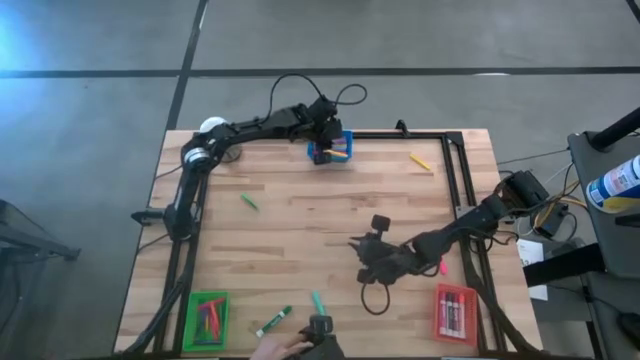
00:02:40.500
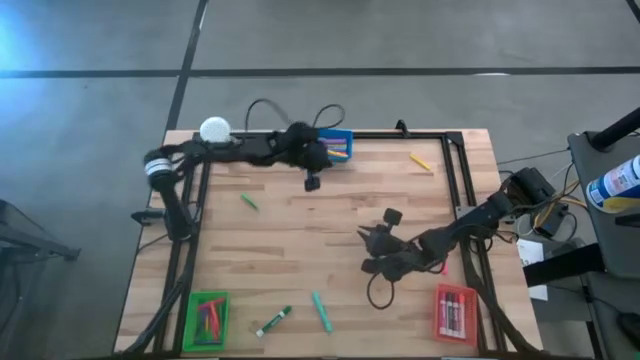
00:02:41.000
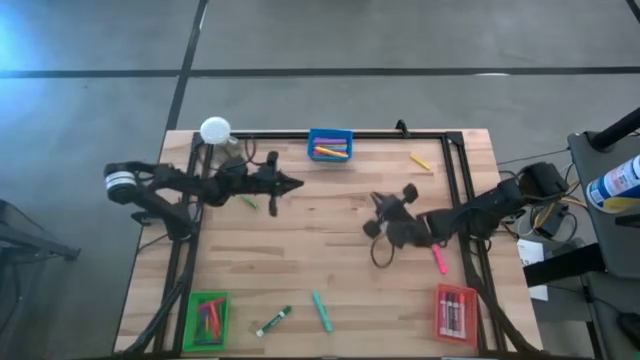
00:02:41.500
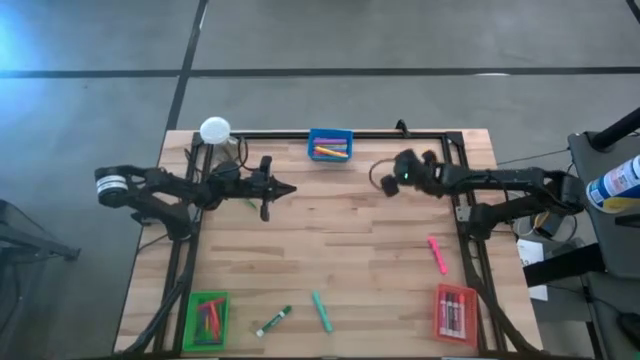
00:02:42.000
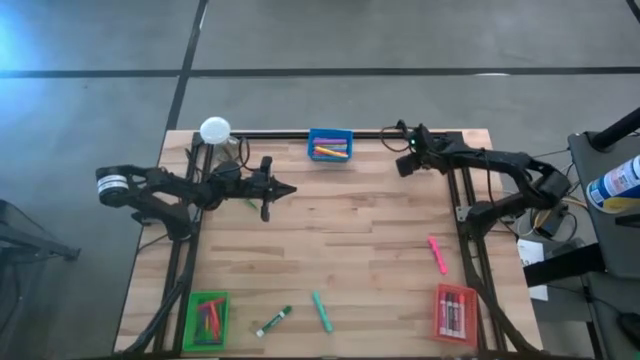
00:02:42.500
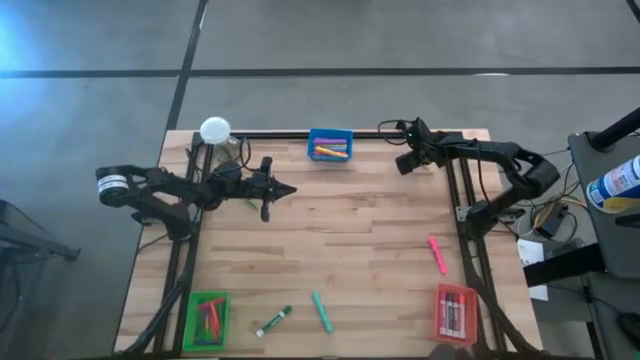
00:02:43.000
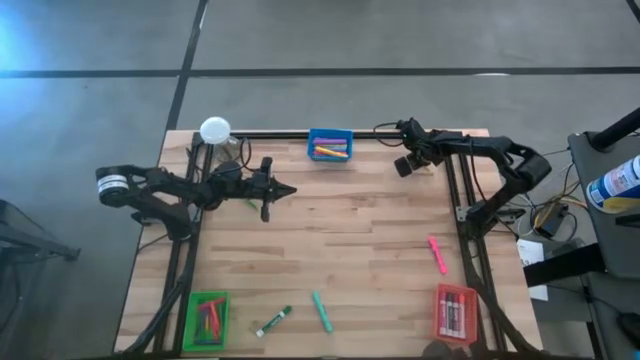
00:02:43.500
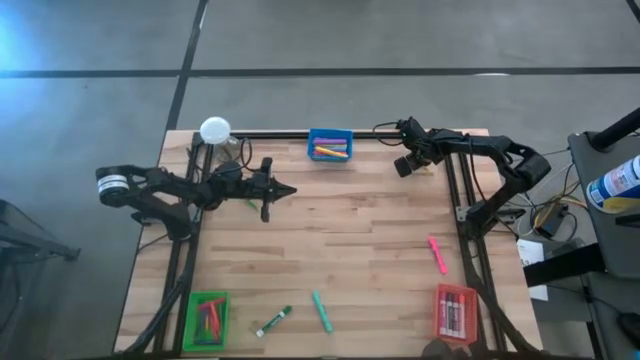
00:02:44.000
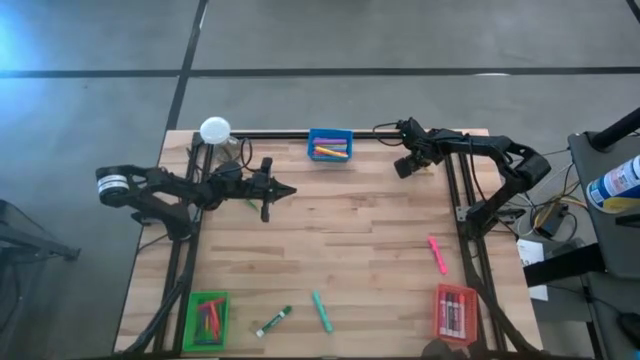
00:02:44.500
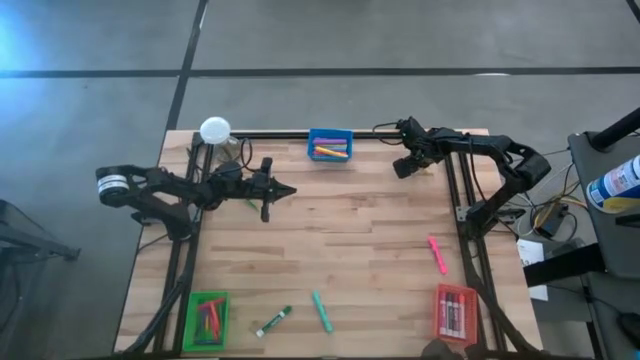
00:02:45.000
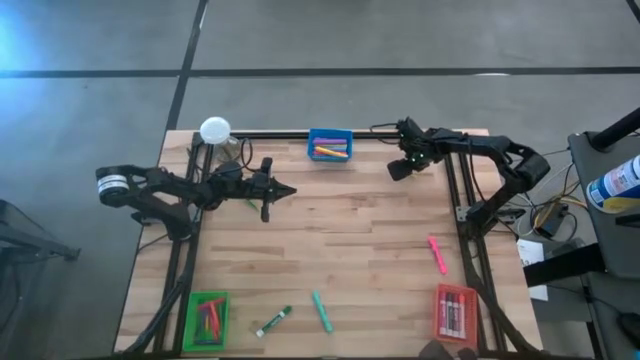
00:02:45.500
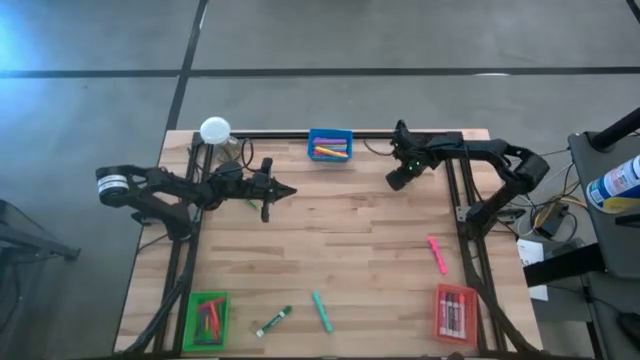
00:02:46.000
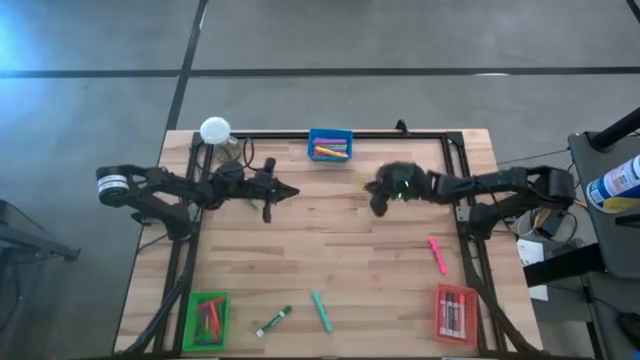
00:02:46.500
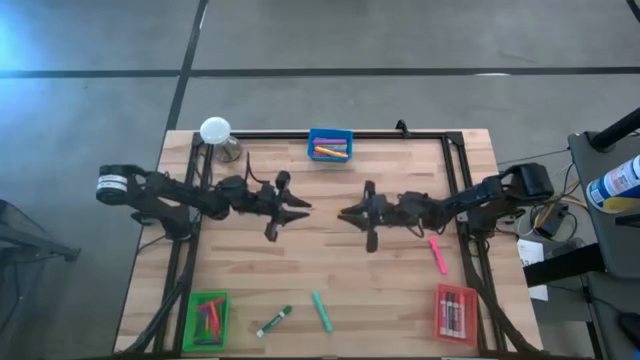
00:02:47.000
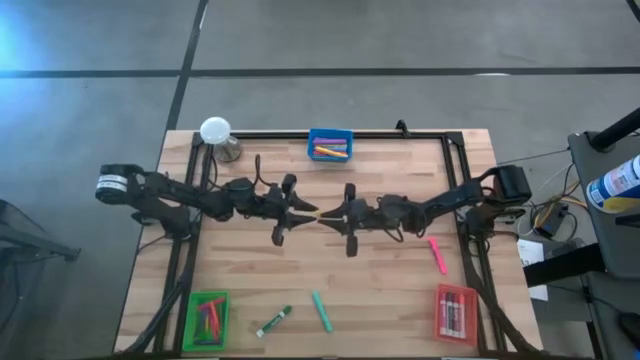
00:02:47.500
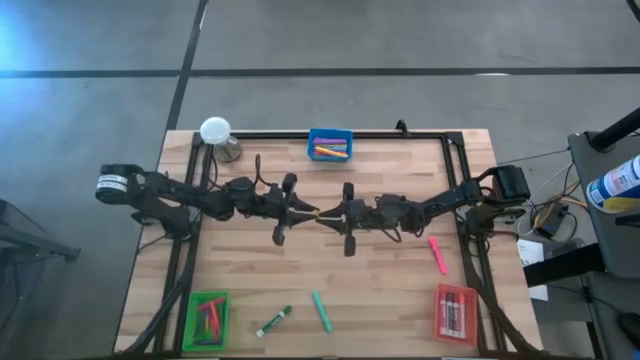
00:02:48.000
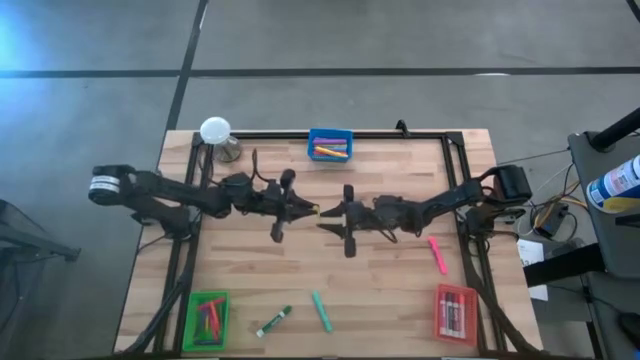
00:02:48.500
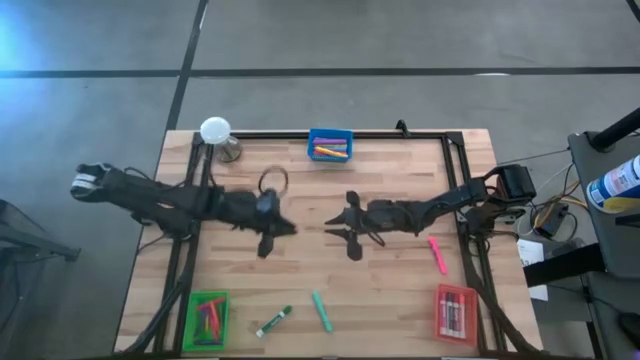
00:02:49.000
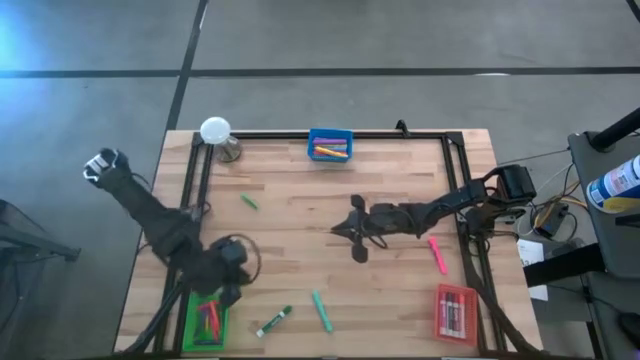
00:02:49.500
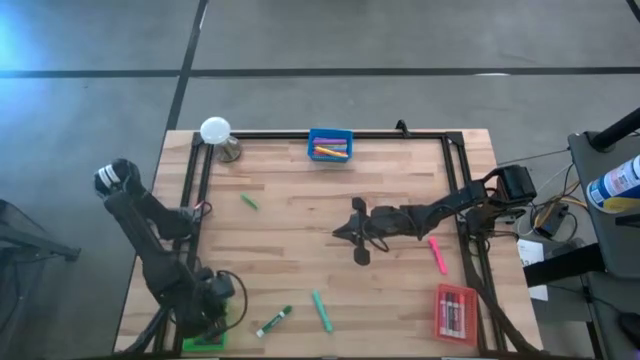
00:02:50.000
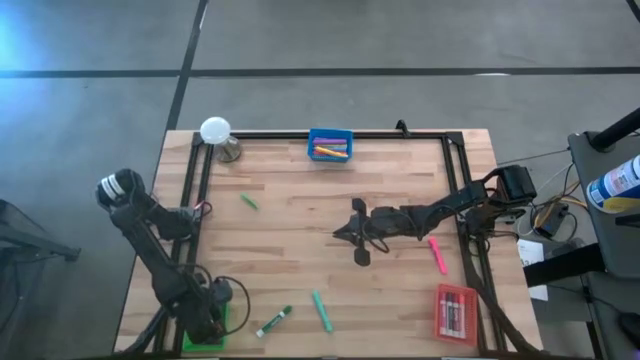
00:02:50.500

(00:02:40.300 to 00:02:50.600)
Task: Pick & Place Markers
Put the yellow pen into the green bin

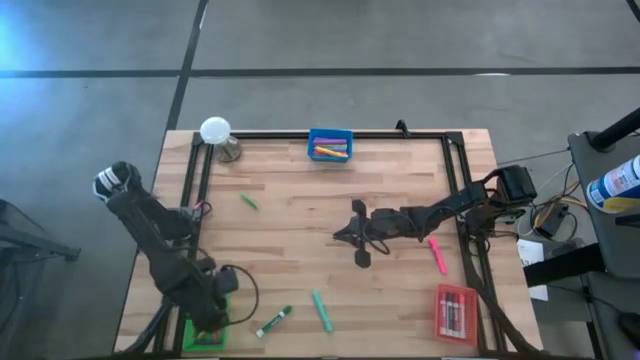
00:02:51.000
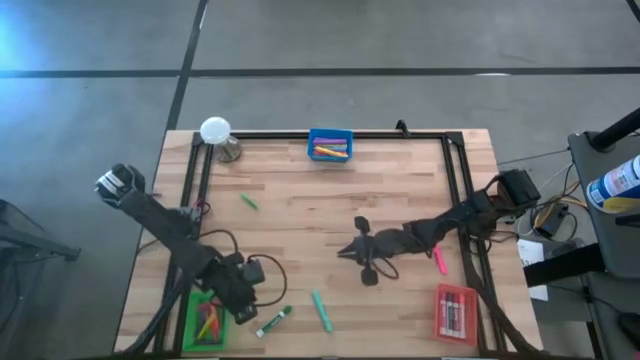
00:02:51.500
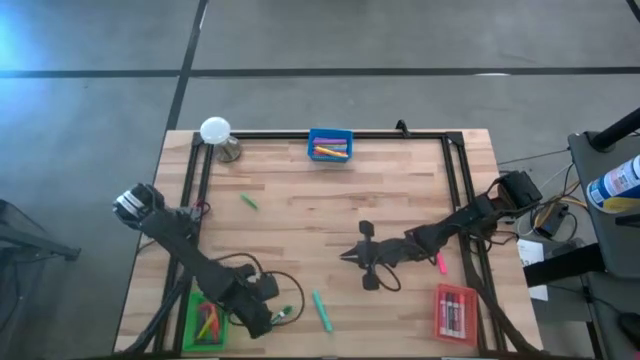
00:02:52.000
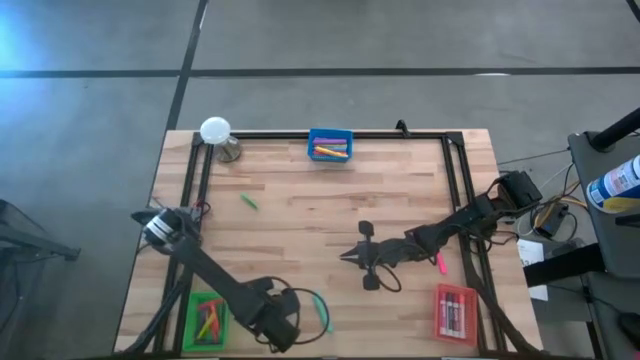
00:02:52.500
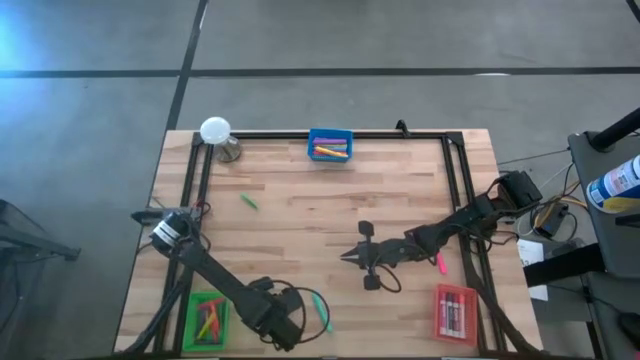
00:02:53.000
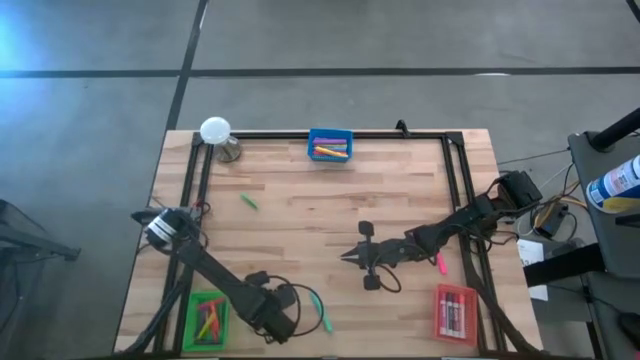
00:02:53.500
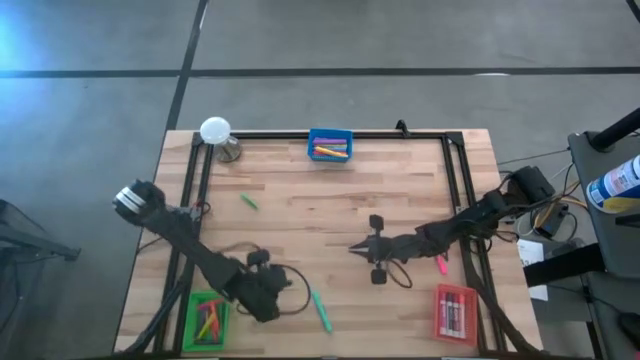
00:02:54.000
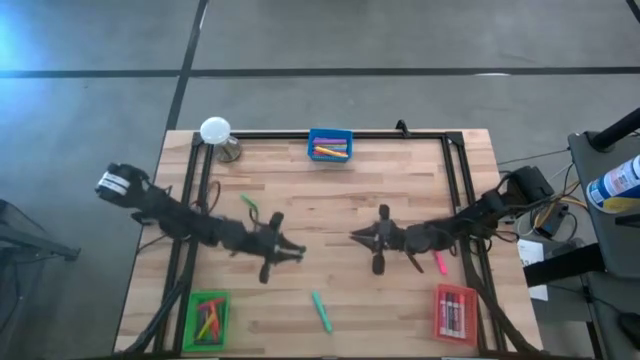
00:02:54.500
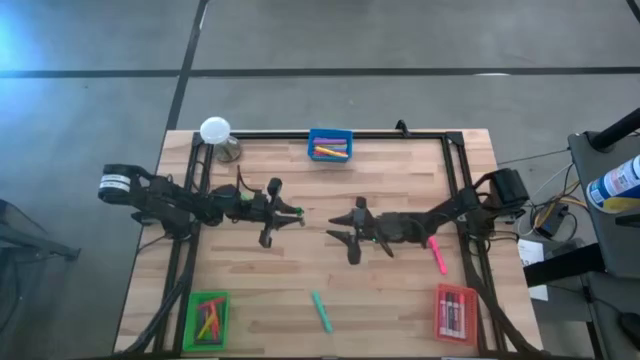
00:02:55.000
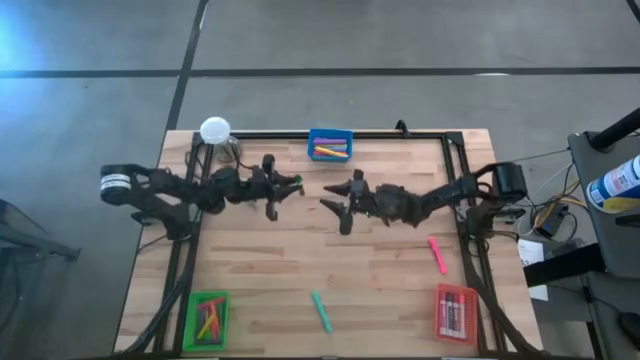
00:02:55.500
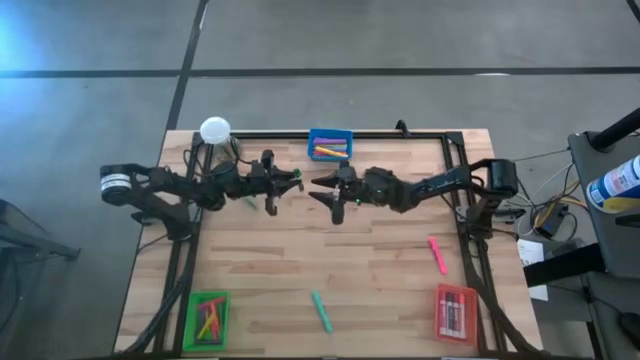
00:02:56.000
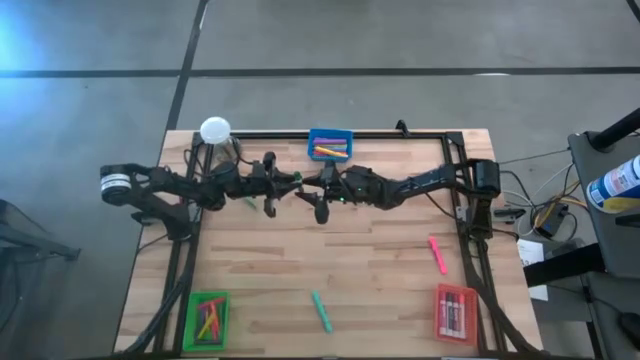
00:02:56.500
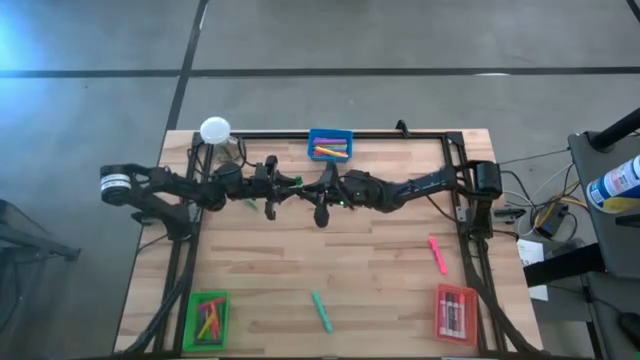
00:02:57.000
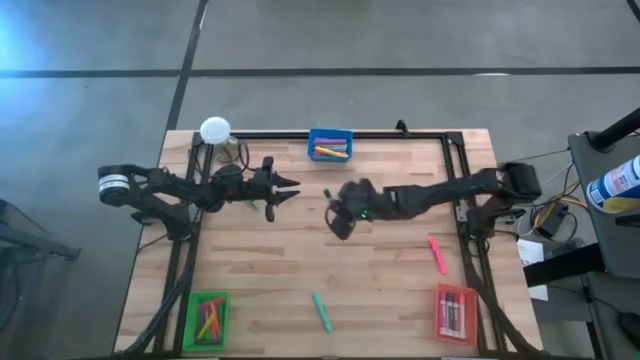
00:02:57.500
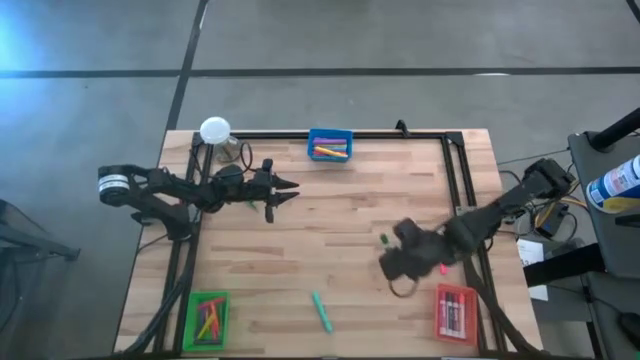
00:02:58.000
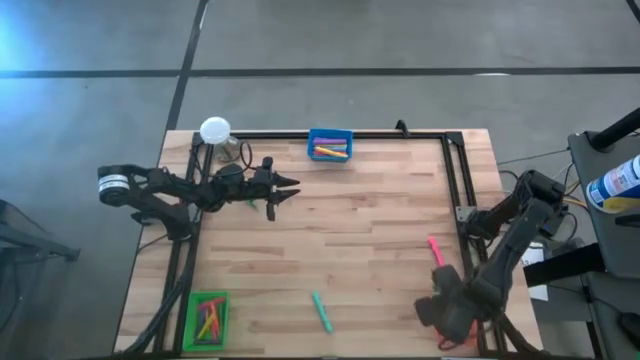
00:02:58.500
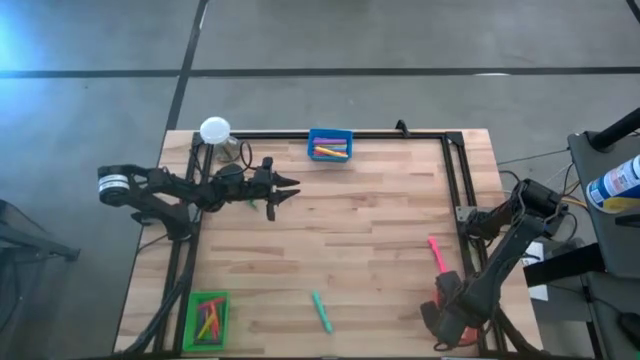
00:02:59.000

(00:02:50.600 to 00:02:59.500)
Put the green marker into the orange bin

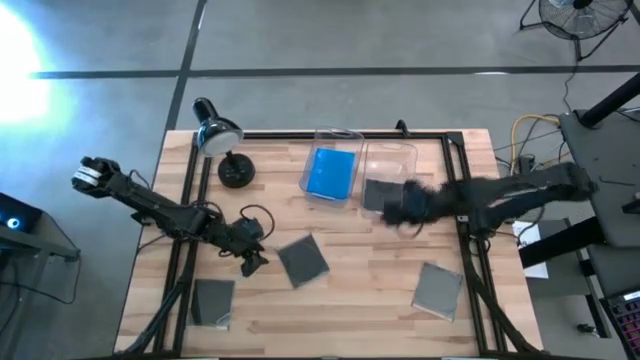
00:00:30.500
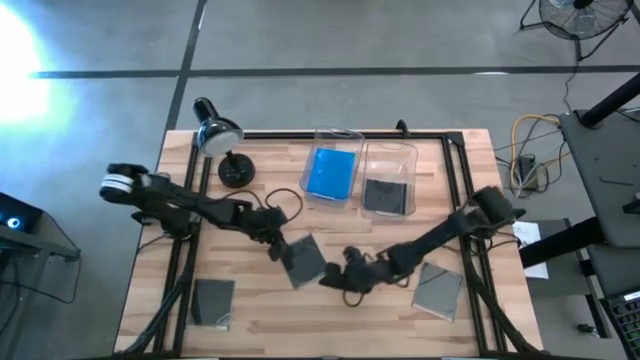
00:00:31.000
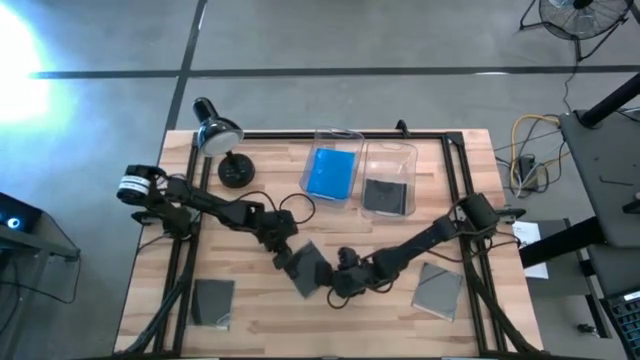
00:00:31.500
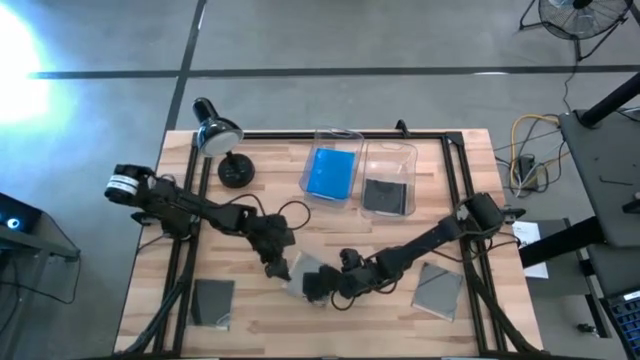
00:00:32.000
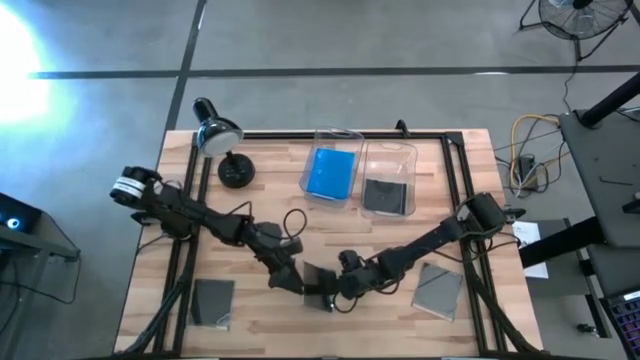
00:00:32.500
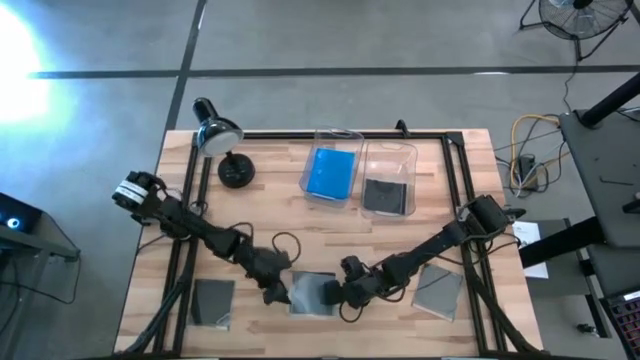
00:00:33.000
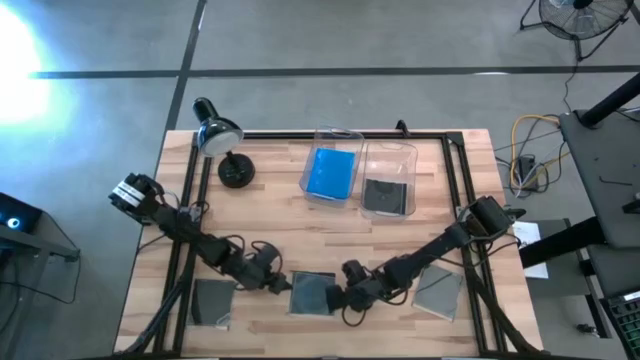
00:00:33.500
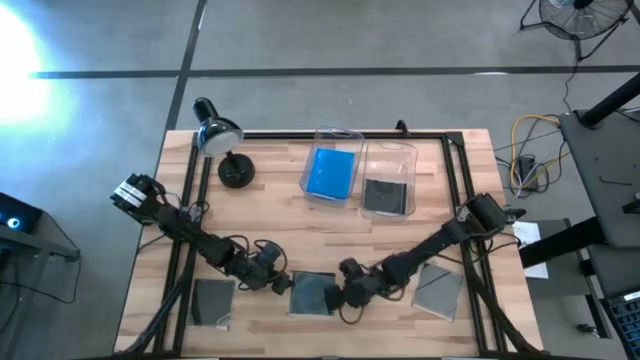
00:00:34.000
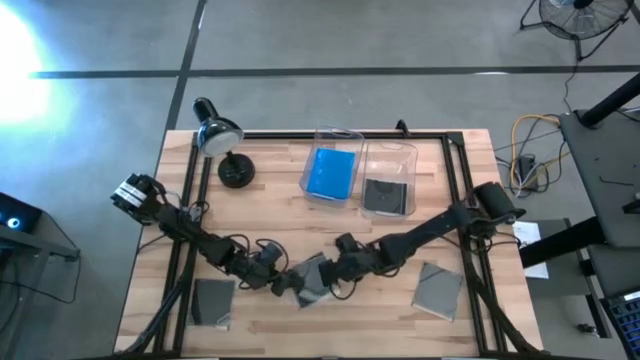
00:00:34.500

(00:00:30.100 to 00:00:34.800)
Task: Pick & place jewel cases by type
Put the black CD case into the right transparent bin
